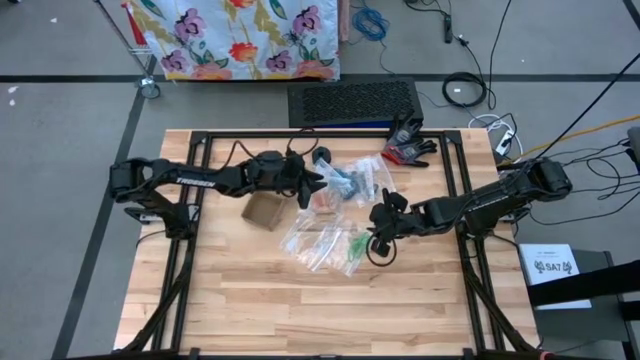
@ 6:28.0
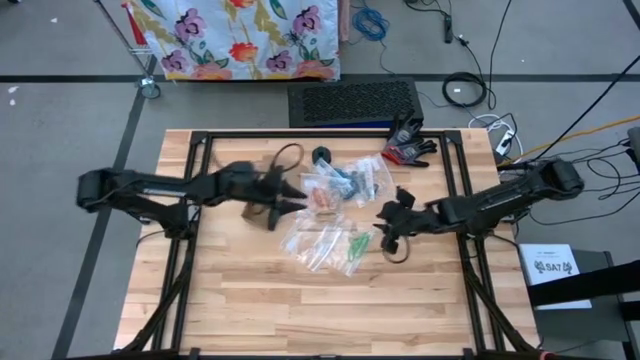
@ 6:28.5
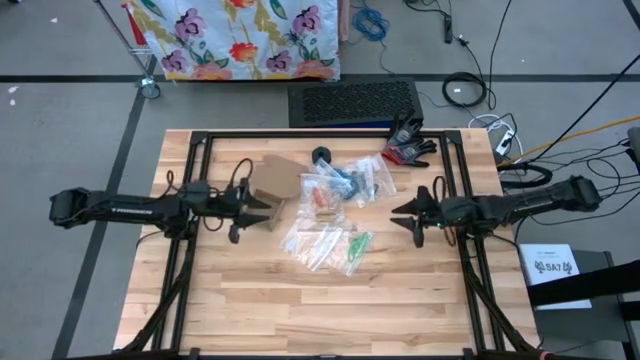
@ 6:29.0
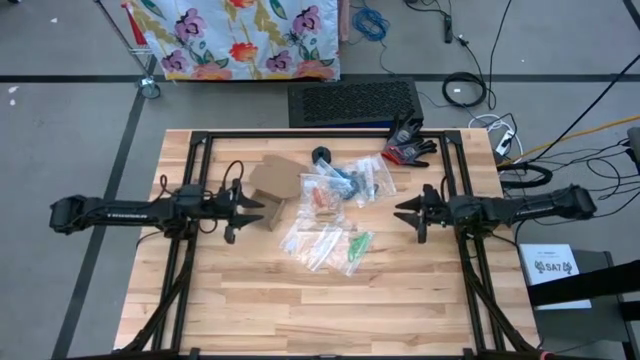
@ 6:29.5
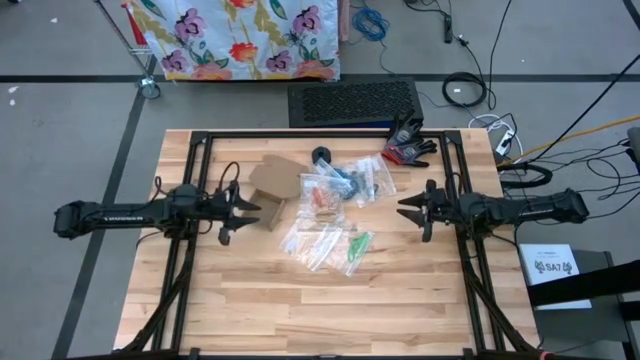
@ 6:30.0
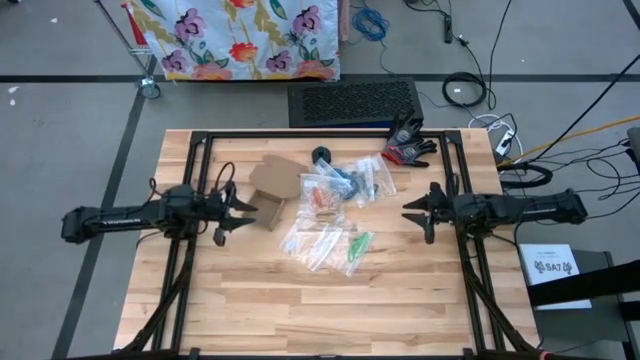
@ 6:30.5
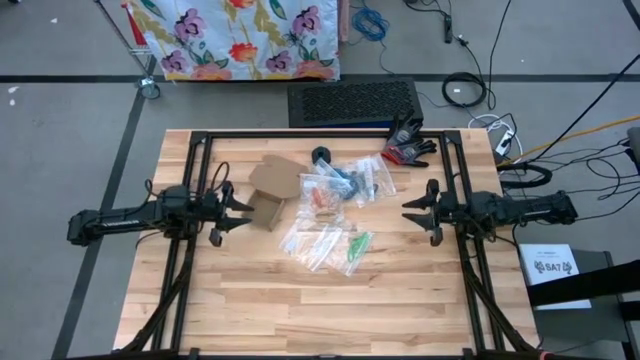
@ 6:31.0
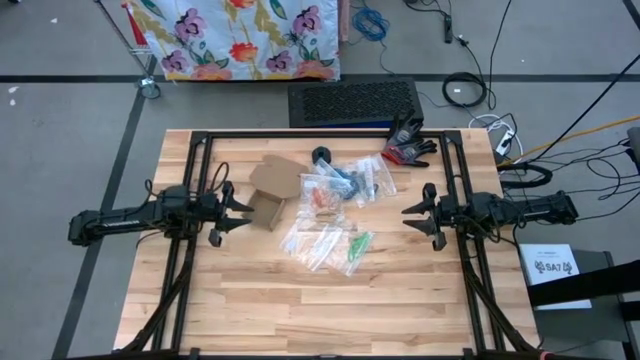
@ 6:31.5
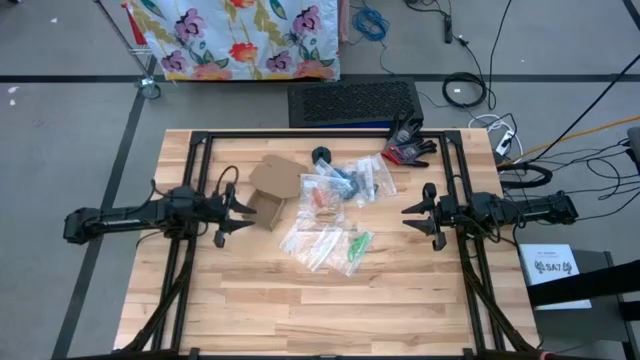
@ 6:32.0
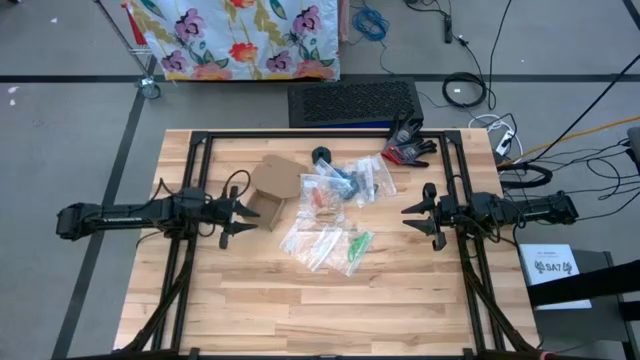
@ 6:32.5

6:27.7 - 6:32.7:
Task: Sort rubber bands
Return to Home Position

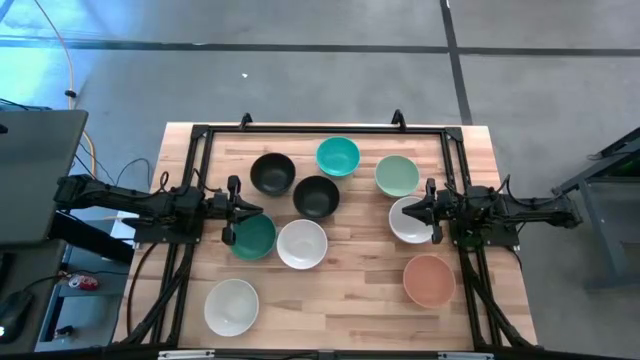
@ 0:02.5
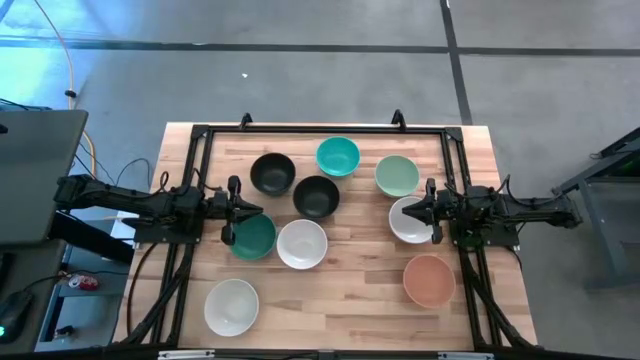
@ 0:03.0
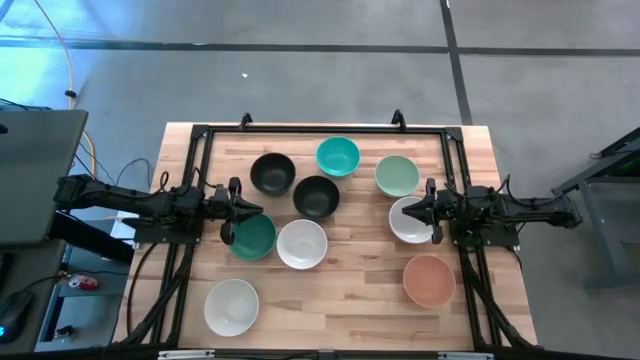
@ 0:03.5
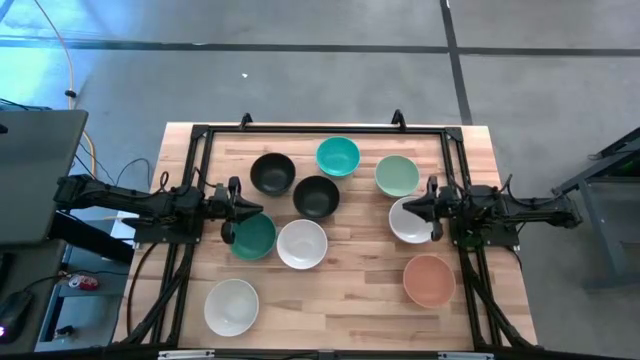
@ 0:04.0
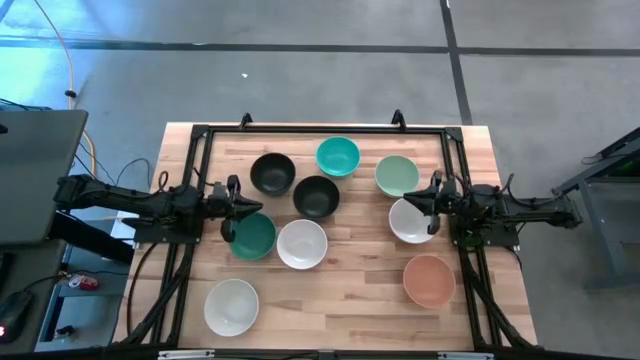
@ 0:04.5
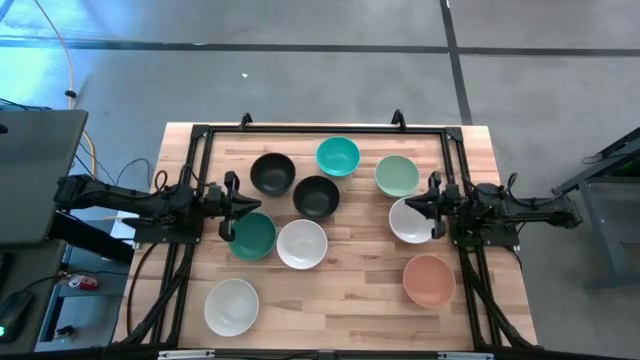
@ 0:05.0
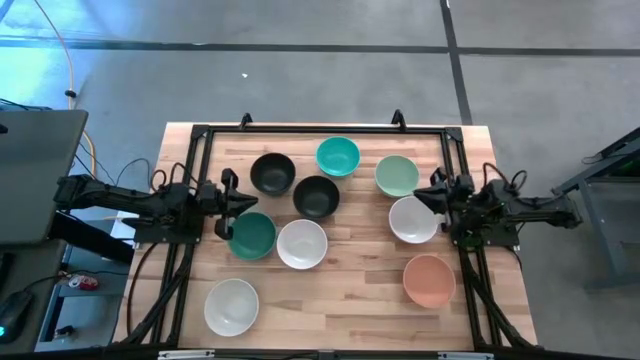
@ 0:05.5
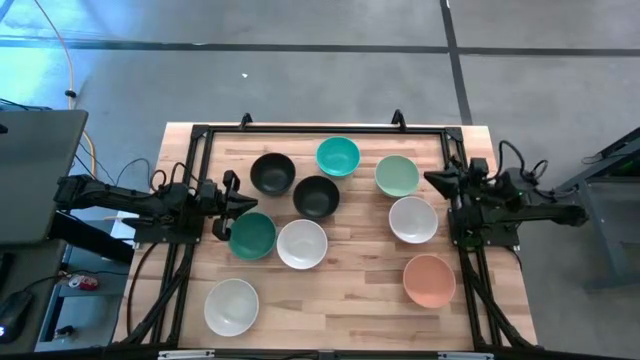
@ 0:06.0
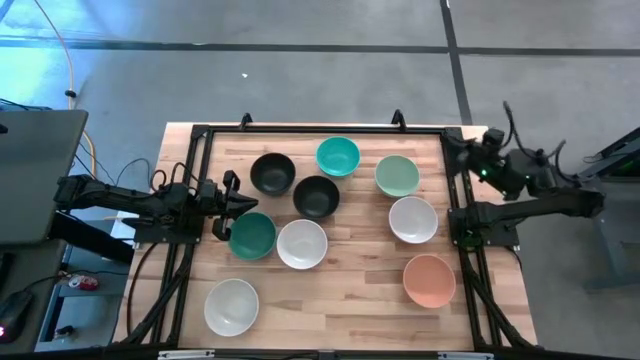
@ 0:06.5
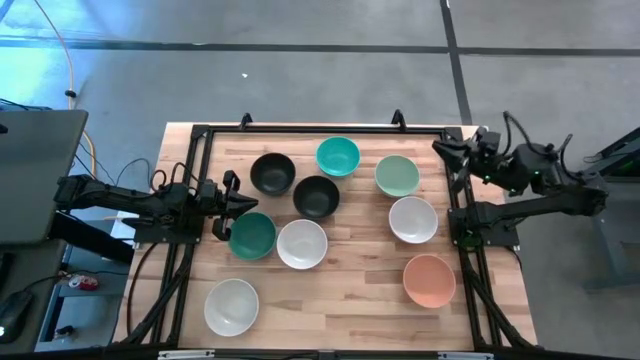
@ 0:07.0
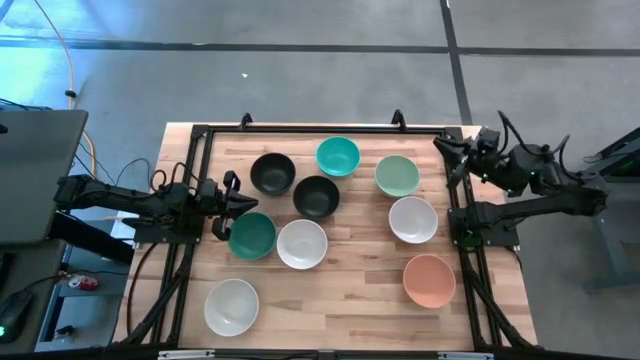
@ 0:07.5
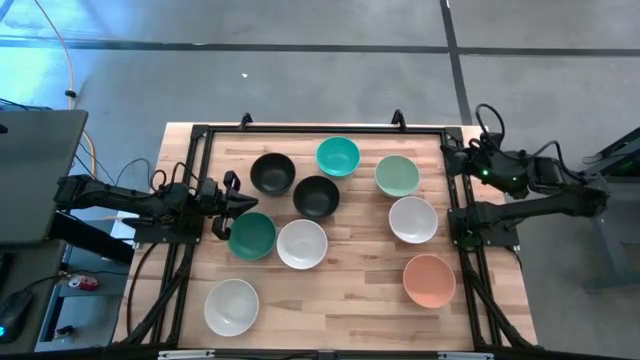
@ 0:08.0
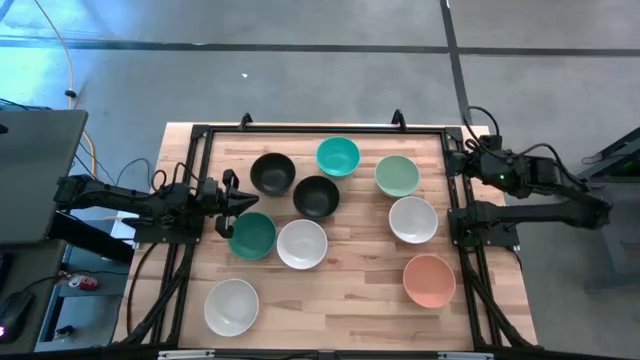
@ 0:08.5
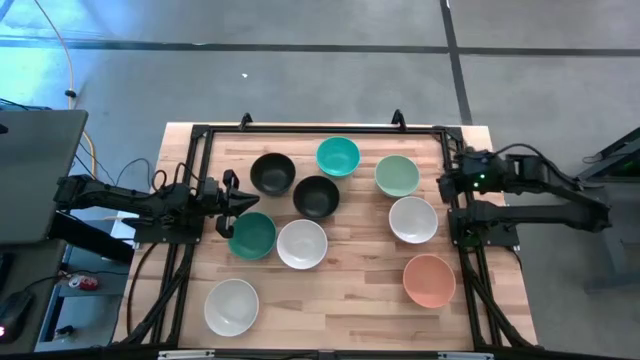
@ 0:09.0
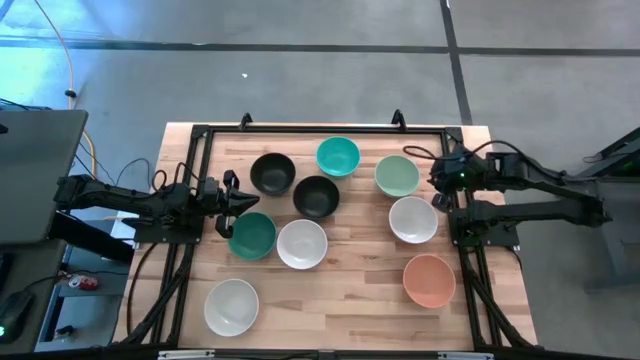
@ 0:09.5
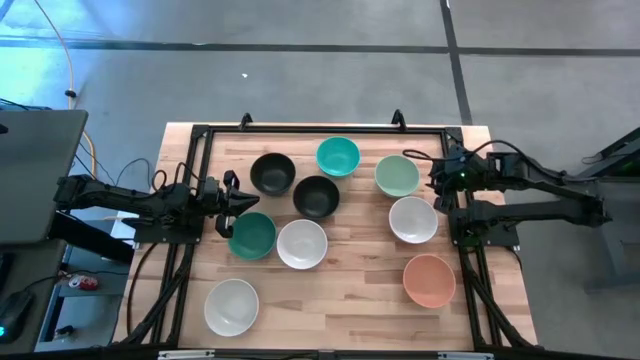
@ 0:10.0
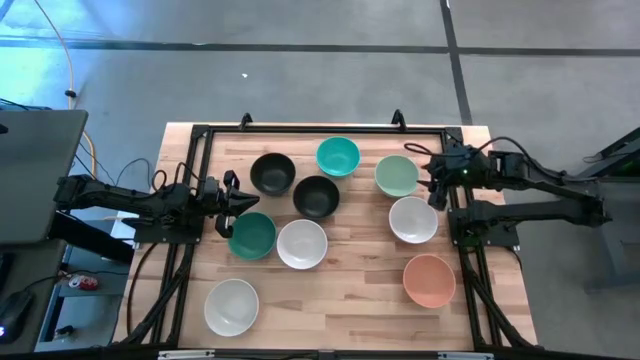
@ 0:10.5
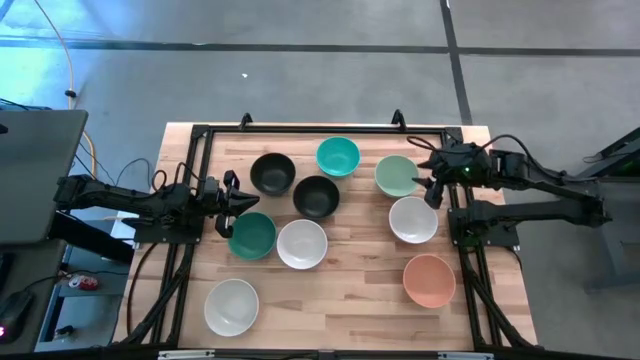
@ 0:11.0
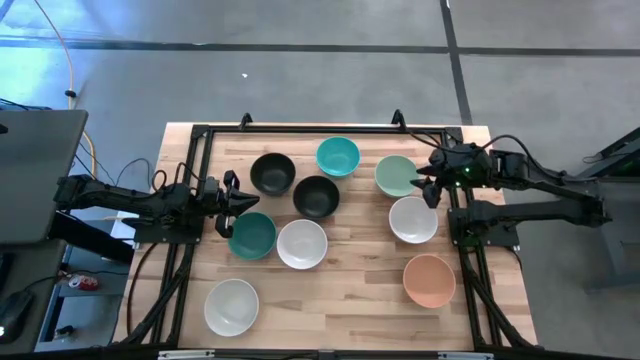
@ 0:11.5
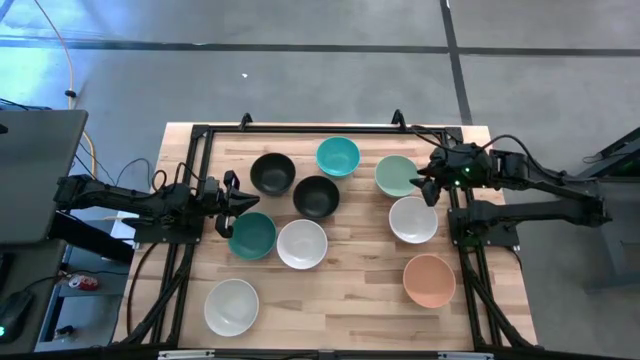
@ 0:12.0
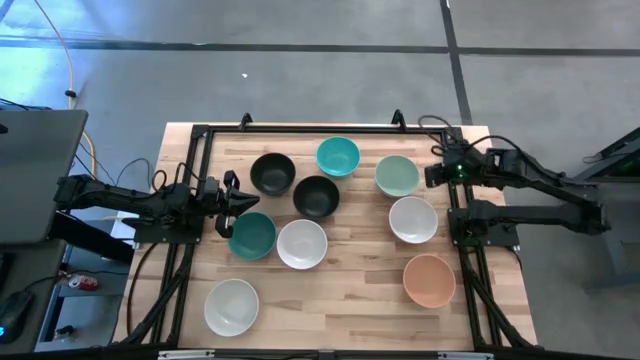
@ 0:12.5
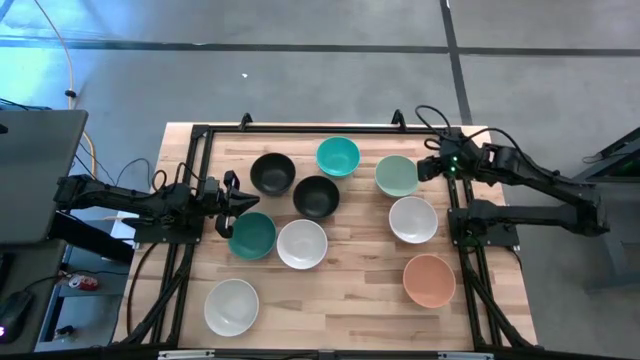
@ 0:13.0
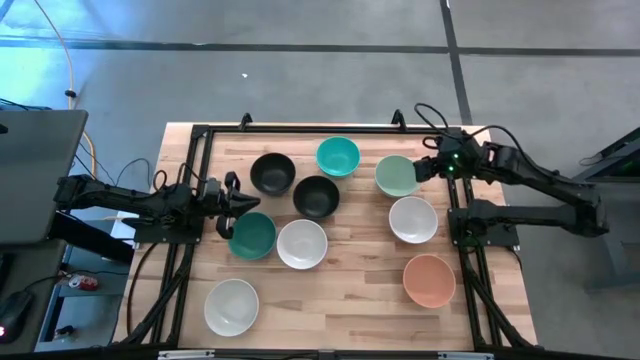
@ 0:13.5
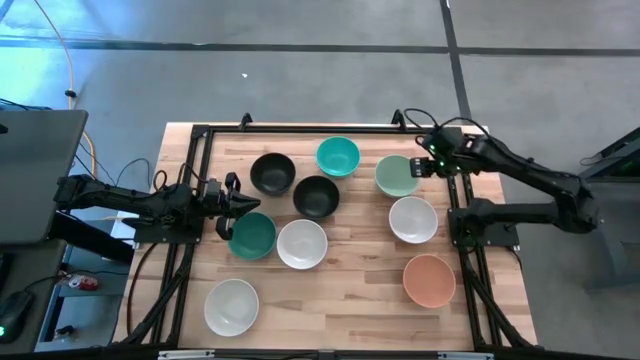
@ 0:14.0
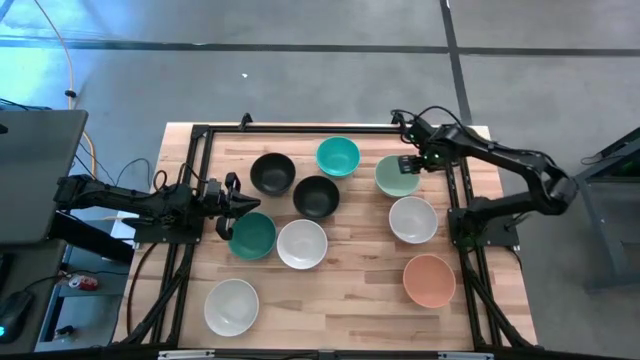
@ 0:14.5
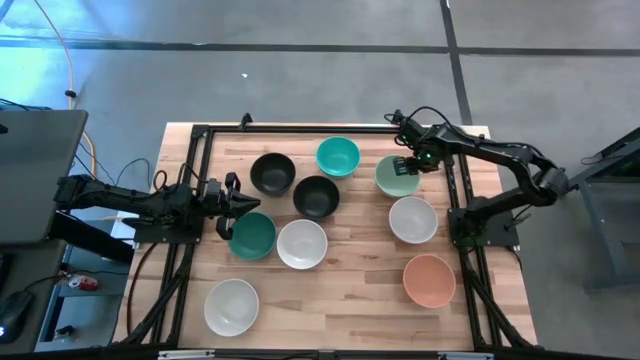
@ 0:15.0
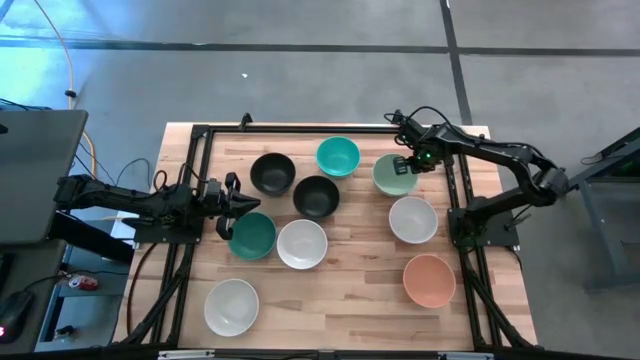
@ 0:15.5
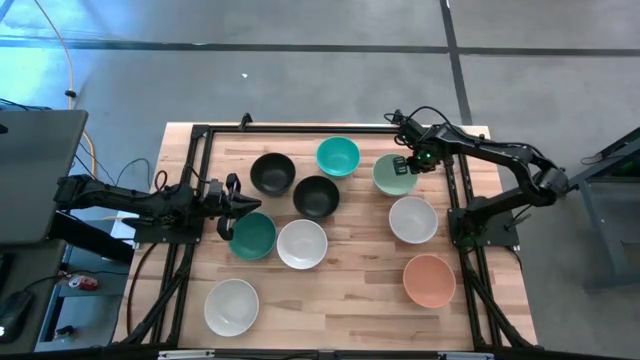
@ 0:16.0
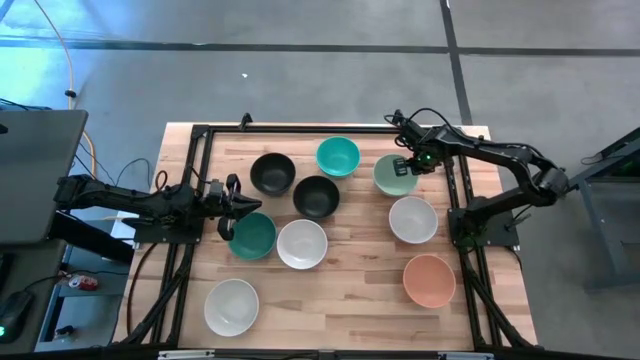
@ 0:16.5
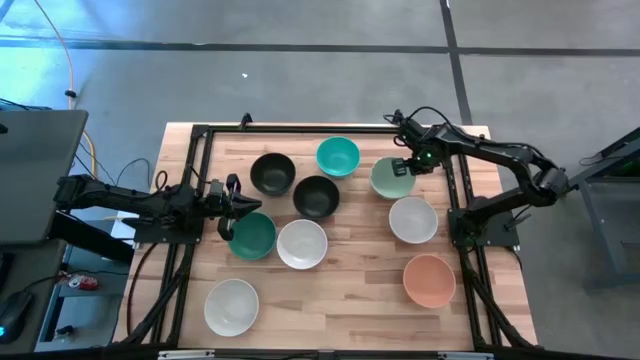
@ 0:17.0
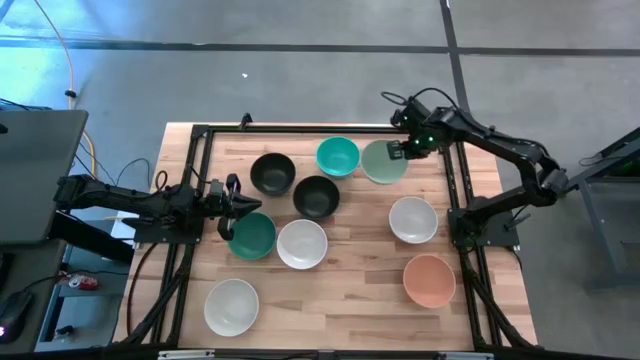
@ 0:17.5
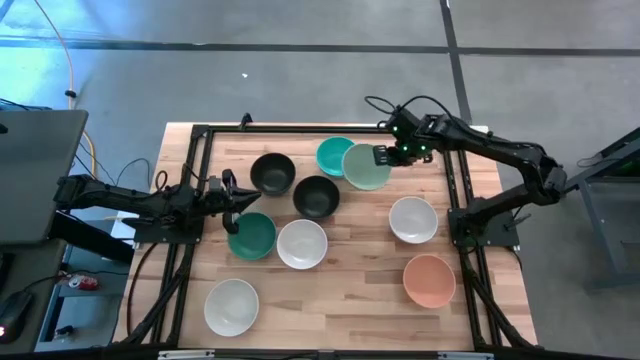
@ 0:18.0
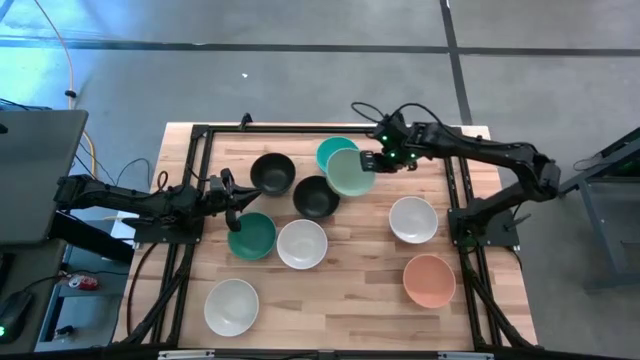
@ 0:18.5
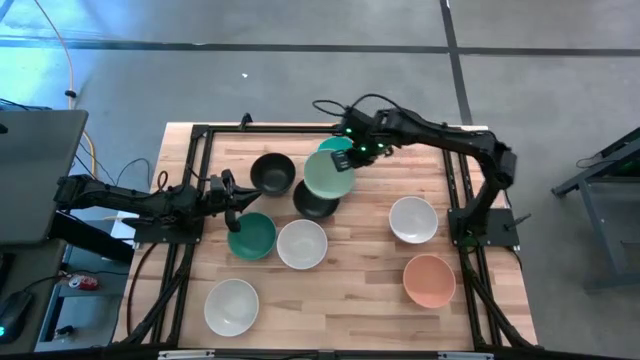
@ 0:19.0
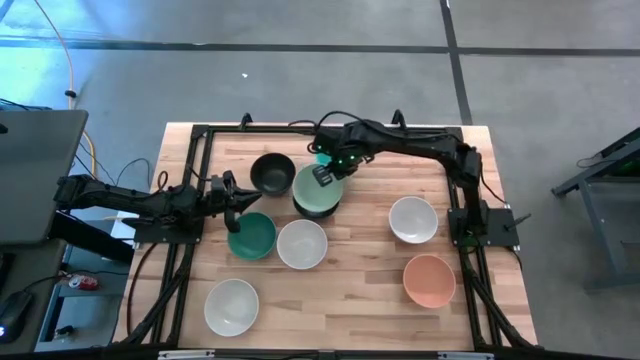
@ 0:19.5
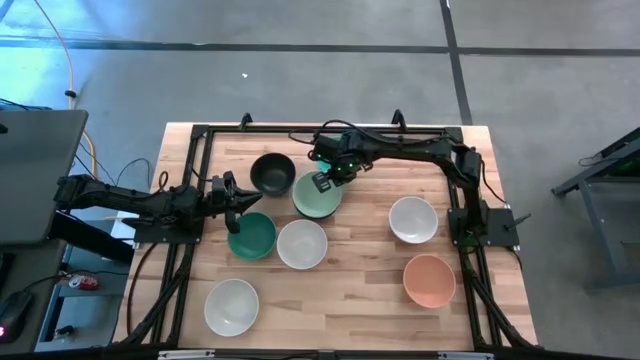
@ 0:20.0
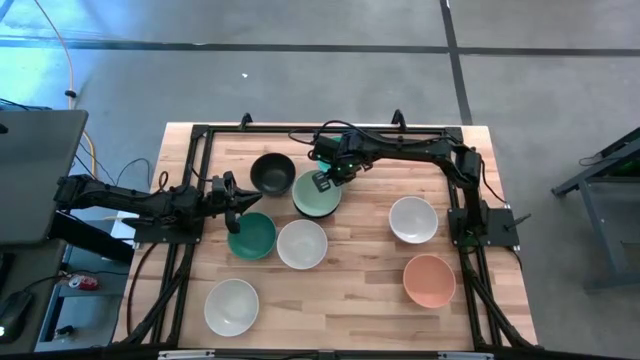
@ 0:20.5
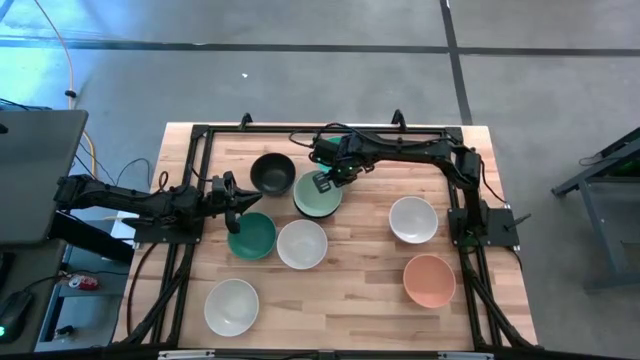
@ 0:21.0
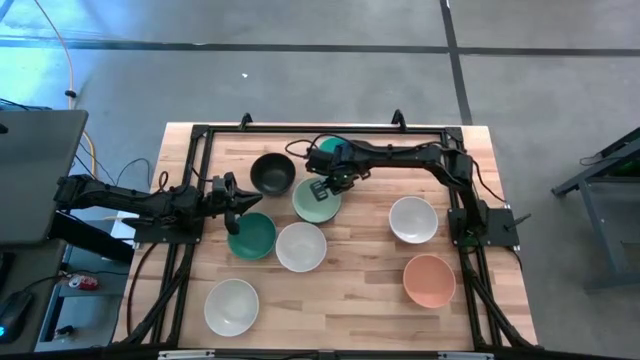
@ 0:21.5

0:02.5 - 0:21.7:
Task: Nest bowls inside each other
Stack the light green bowl on top of bottom right black bowl
